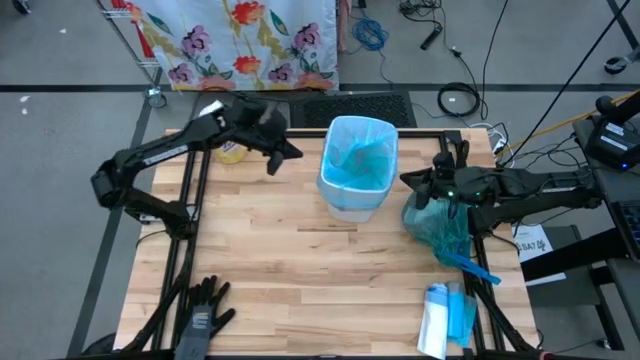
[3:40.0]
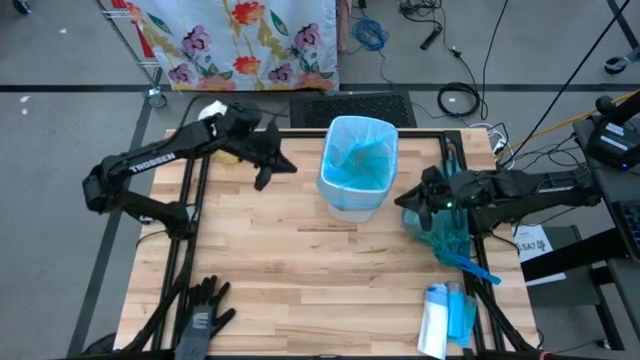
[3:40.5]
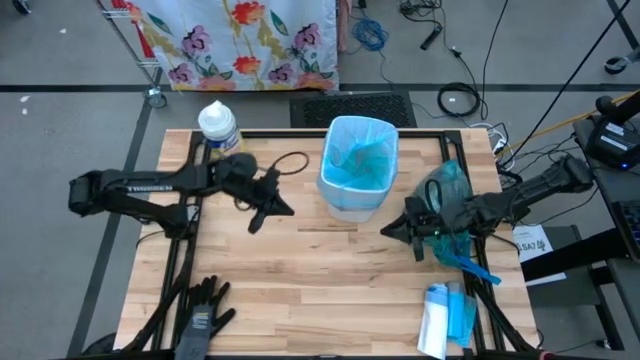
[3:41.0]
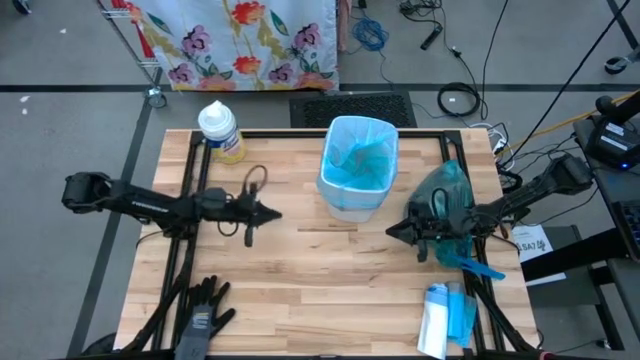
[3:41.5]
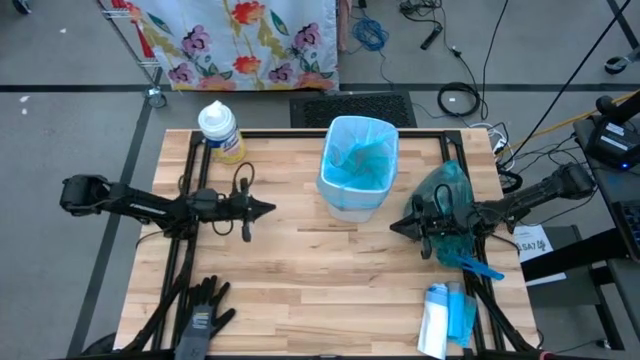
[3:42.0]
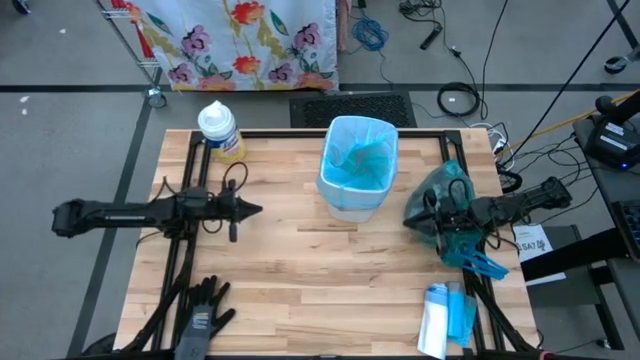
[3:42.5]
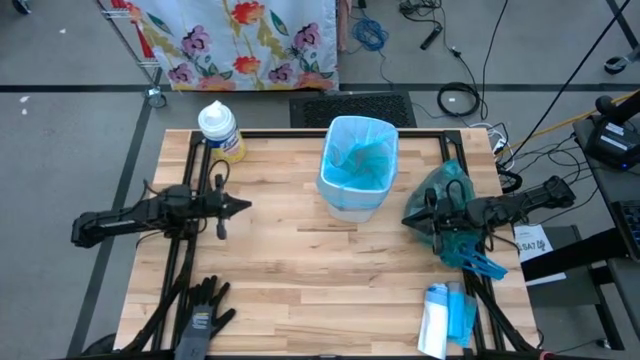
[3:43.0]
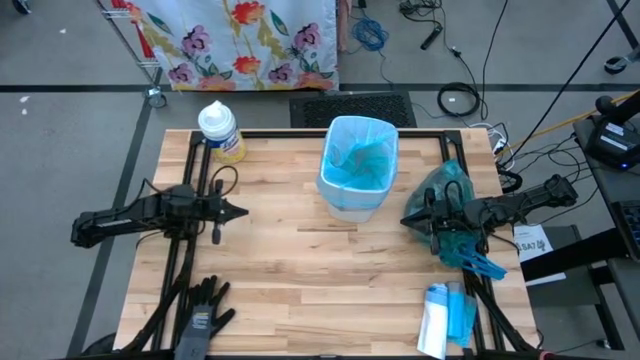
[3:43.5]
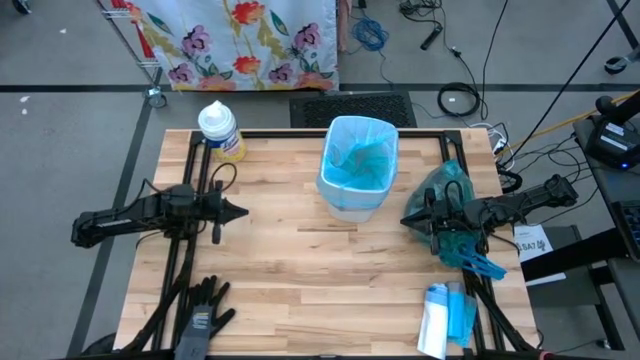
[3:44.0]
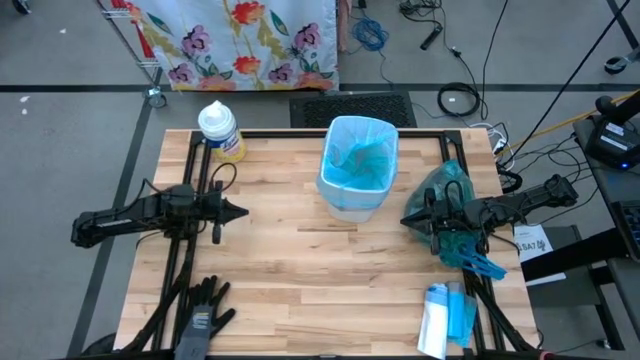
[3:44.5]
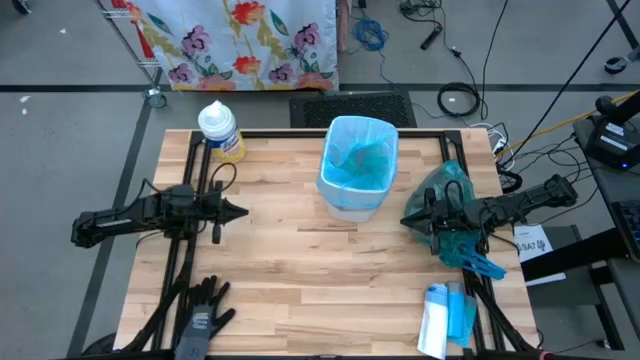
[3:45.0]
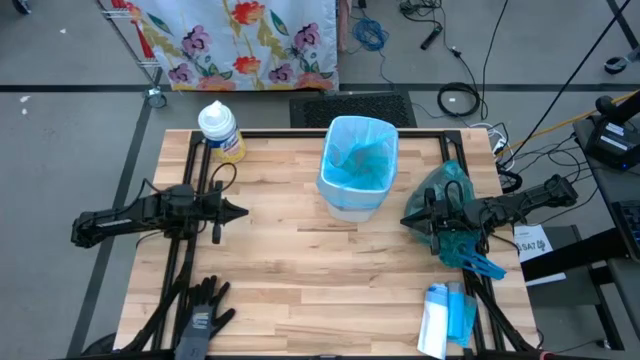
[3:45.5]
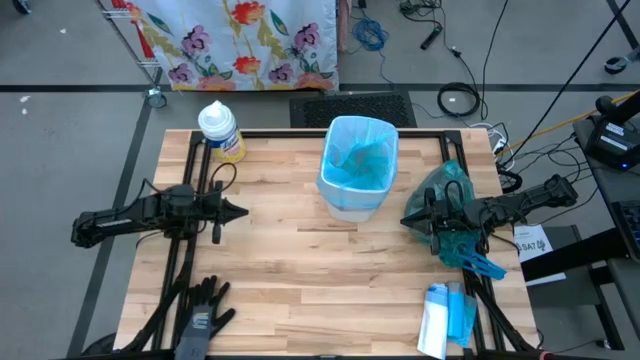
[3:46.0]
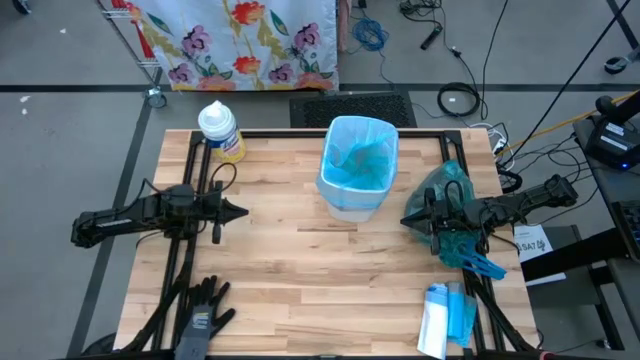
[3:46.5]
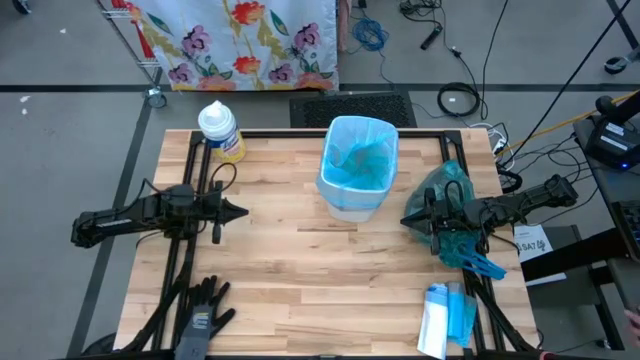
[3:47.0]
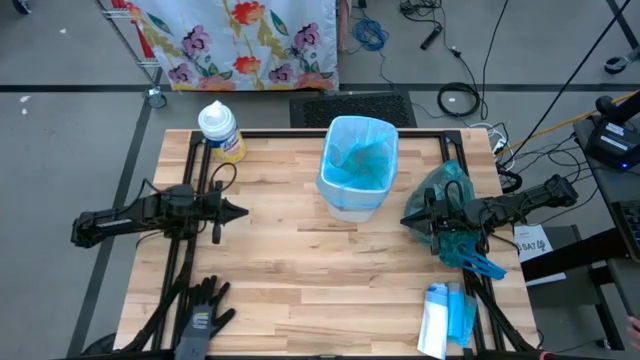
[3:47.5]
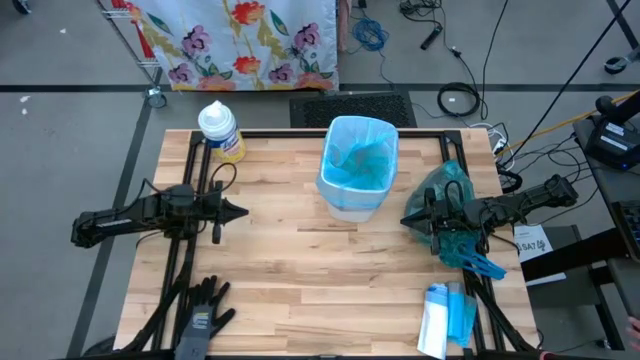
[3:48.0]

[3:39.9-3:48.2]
Task: place trash/remove bag and relplace
Return to Home Position

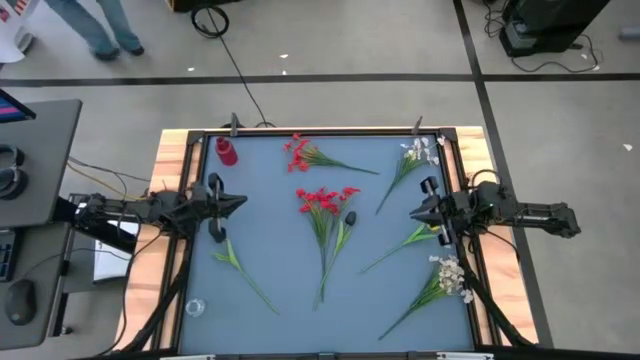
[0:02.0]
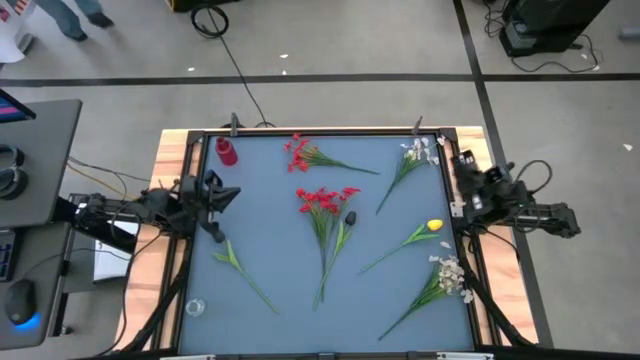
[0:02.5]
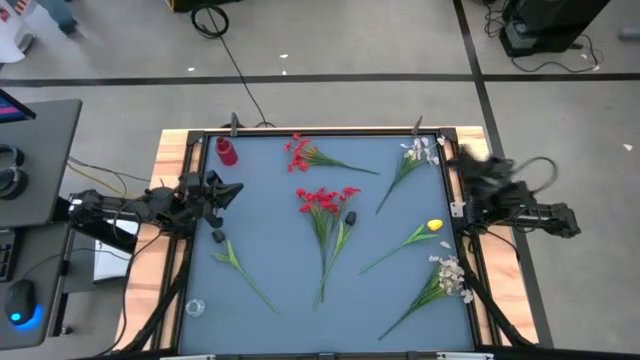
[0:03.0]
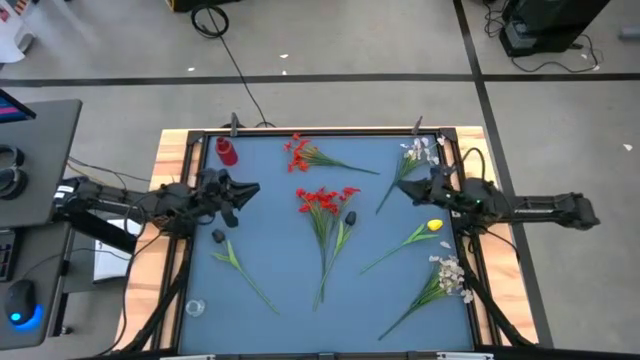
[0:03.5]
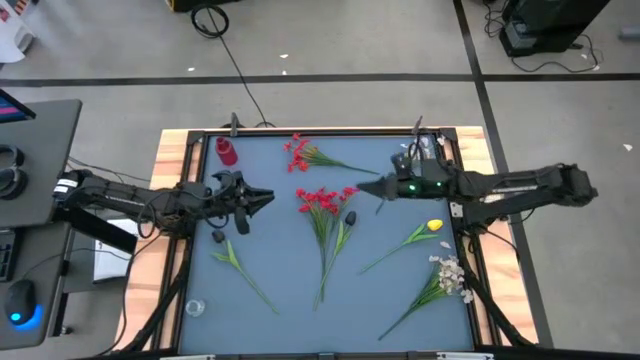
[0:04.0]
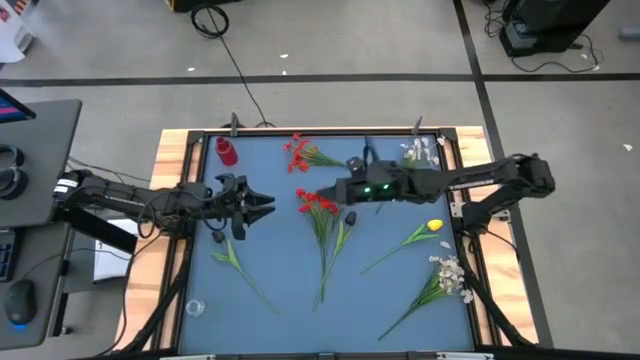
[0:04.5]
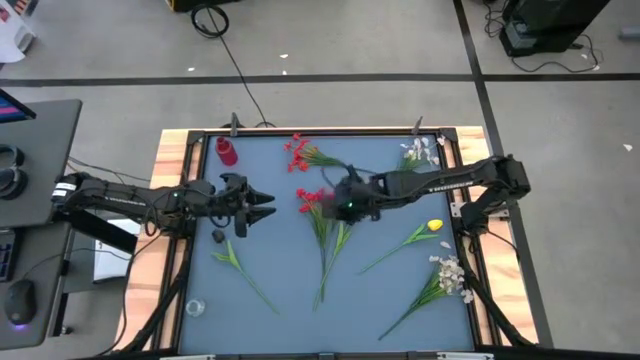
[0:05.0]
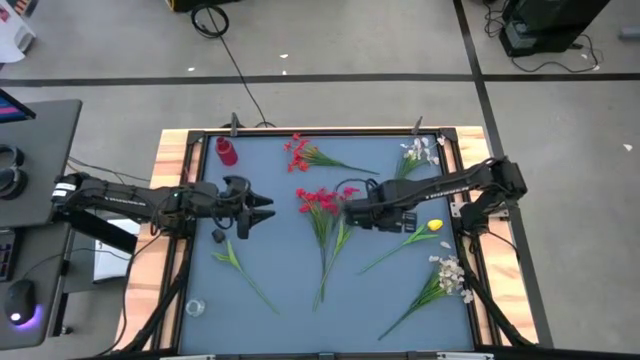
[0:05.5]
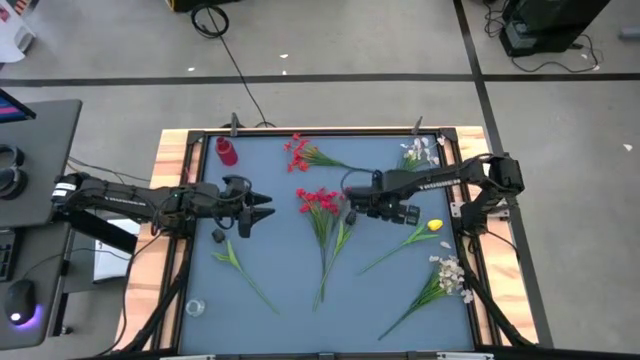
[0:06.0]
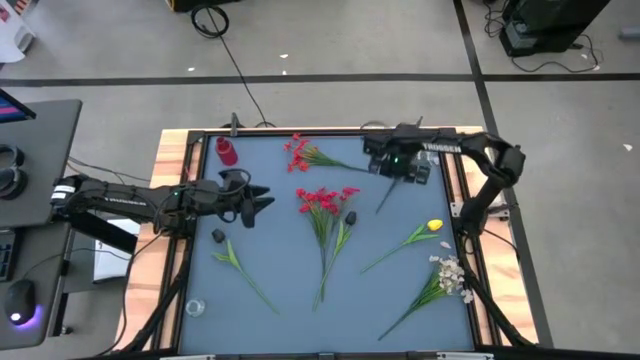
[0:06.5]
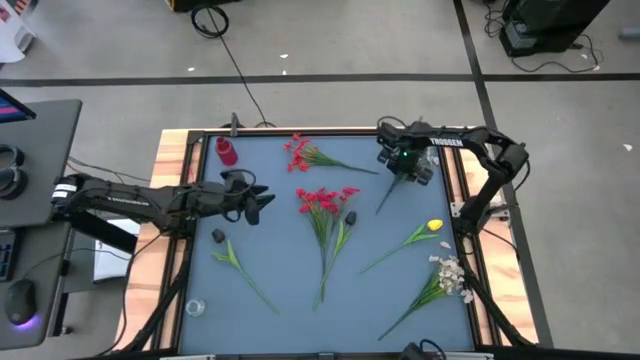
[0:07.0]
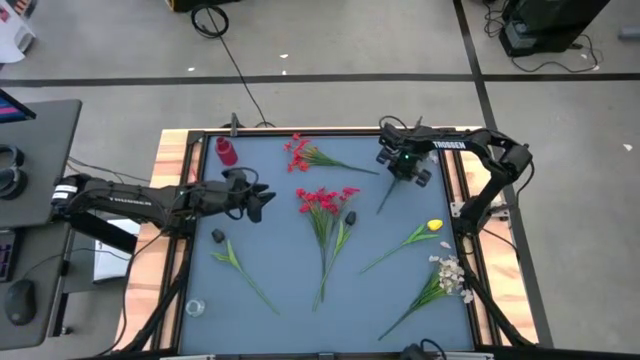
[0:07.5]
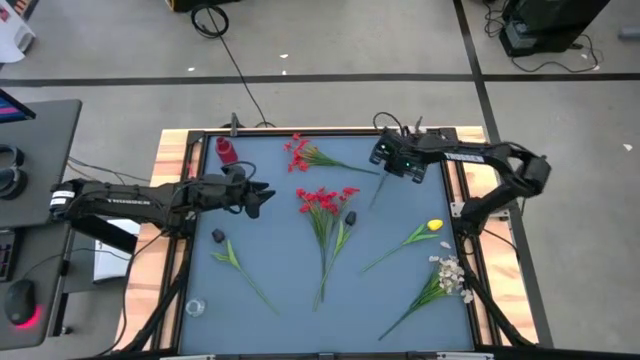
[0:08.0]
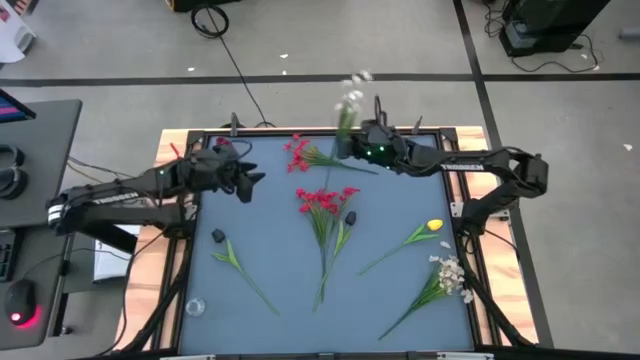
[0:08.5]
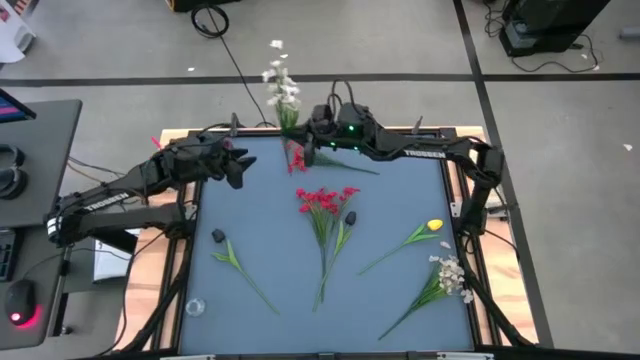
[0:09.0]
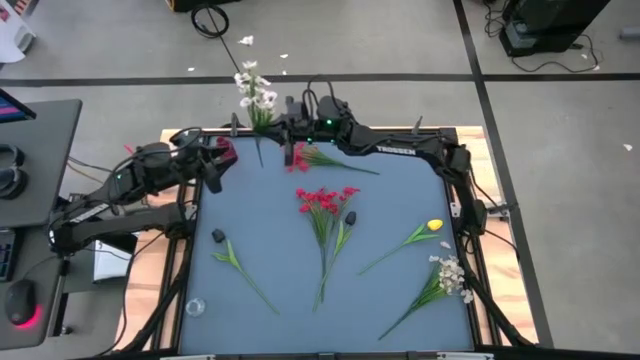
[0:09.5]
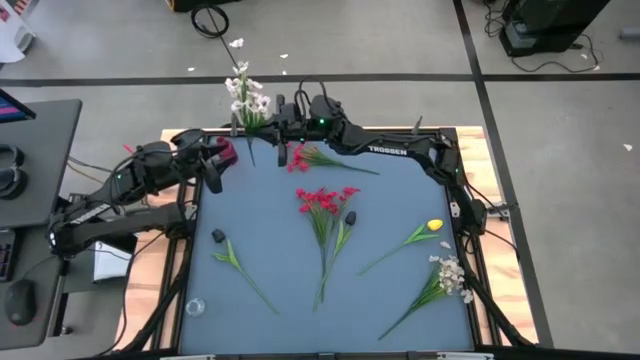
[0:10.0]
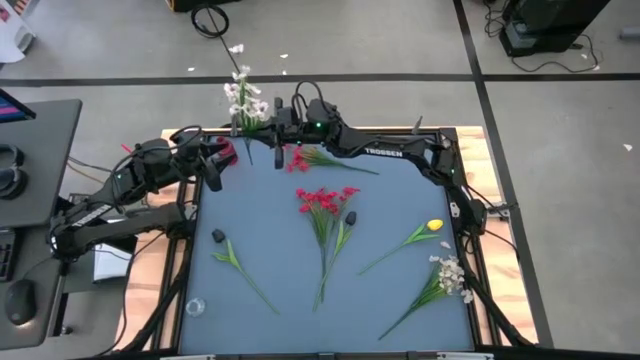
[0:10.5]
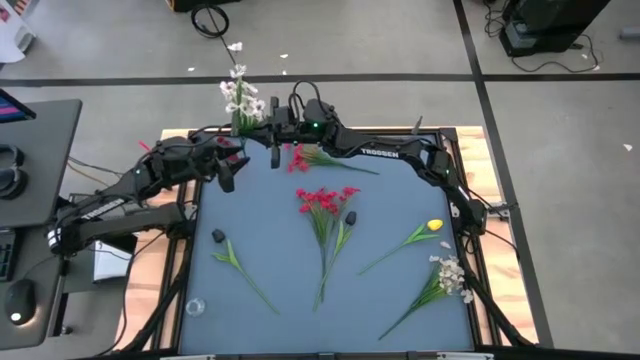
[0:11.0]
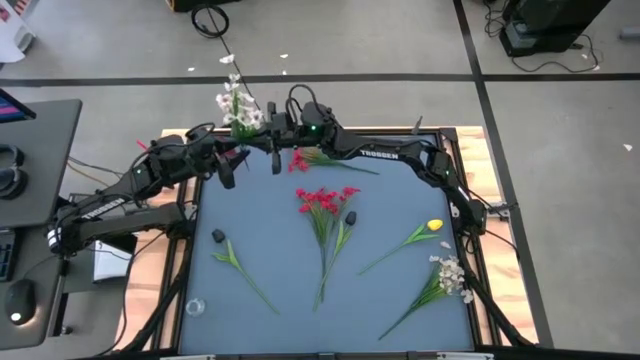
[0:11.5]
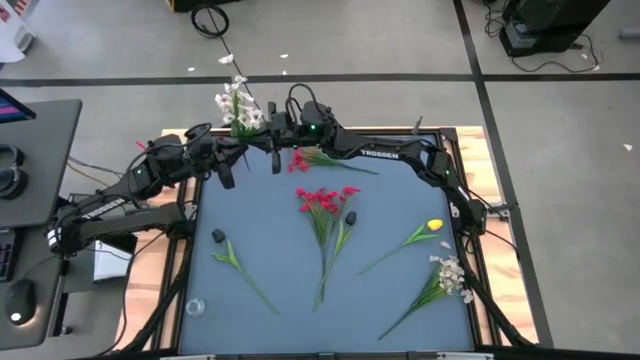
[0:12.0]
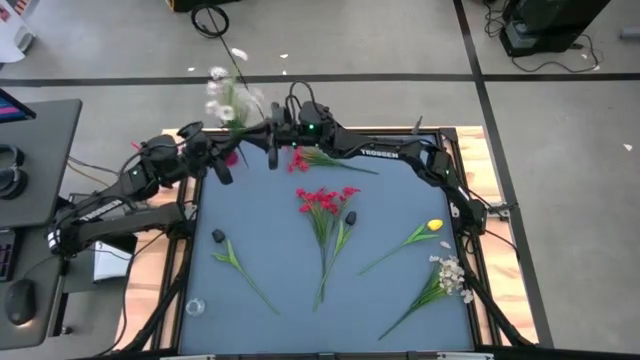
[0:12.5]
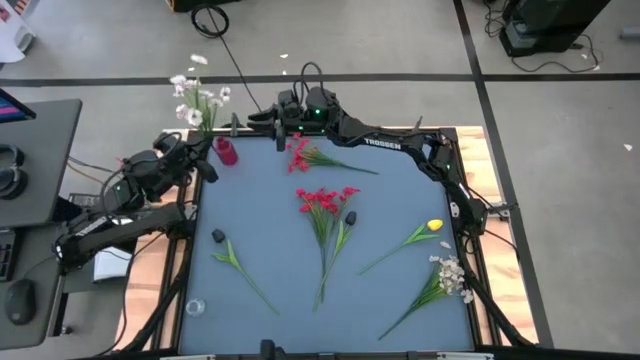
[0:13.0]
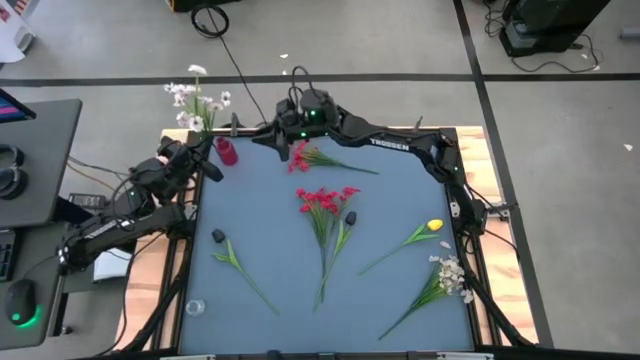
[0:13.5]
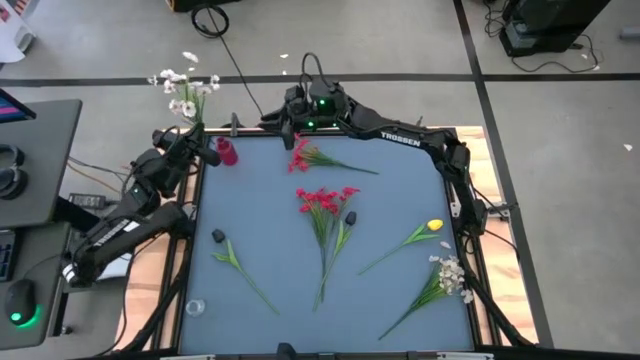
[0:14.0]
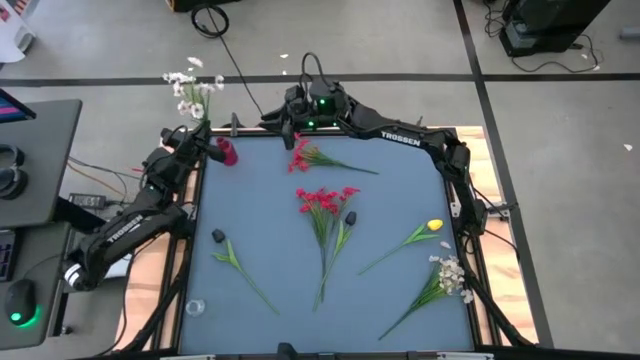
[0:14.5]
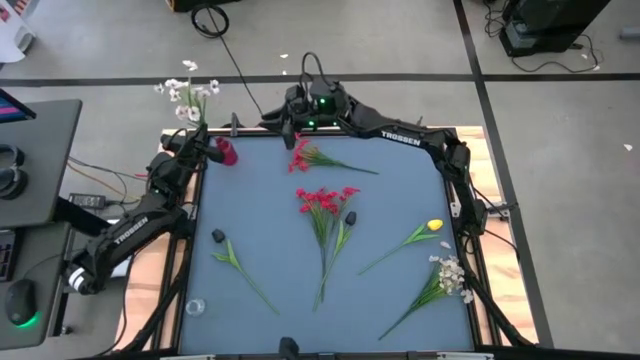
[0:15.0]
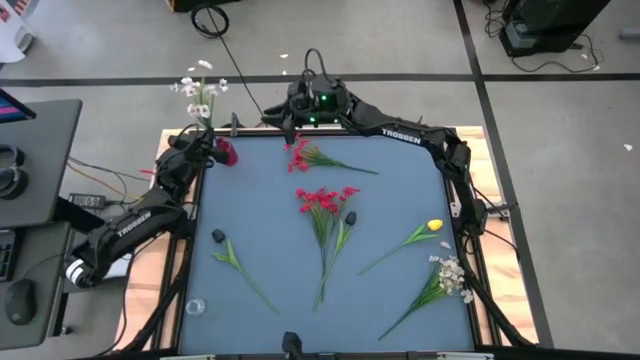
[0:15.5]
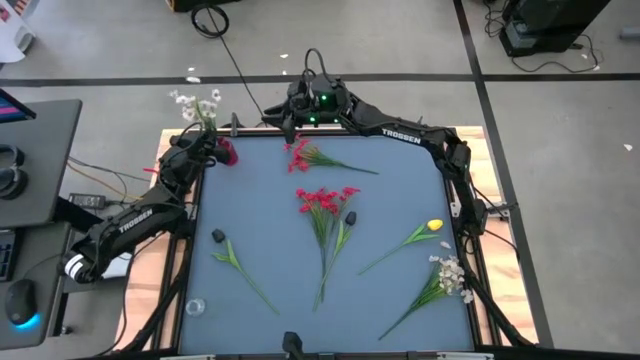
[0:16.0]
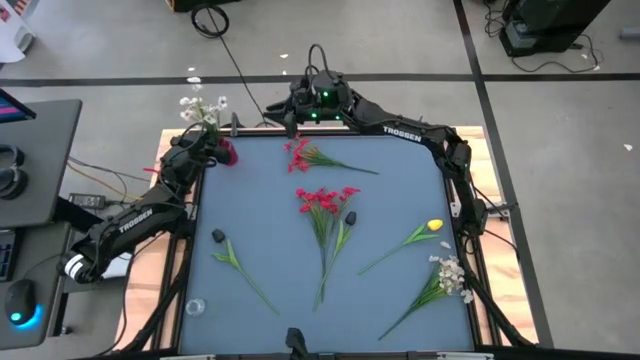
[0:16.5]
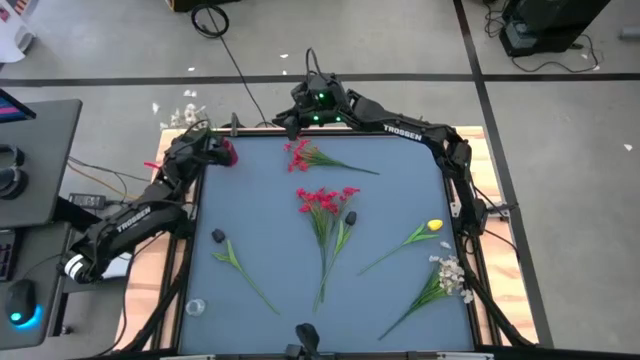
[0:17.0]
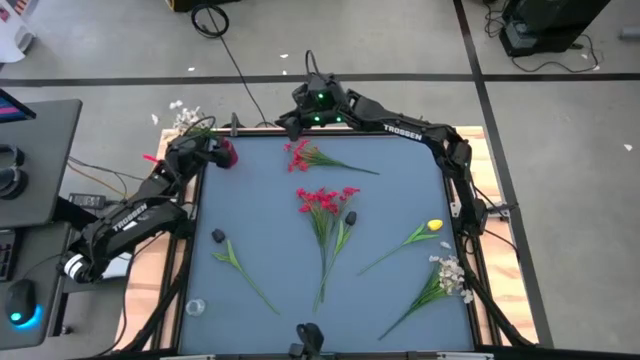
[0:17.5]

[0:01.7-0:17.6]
Task: Sort flowers into vase by color
Put the top white flowers into the red vase
